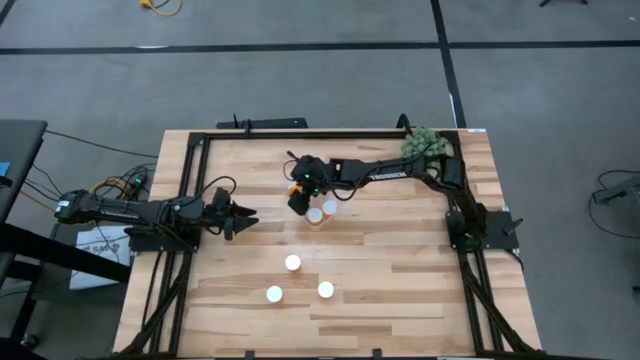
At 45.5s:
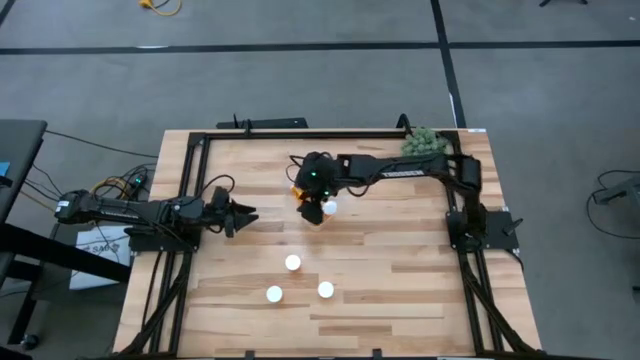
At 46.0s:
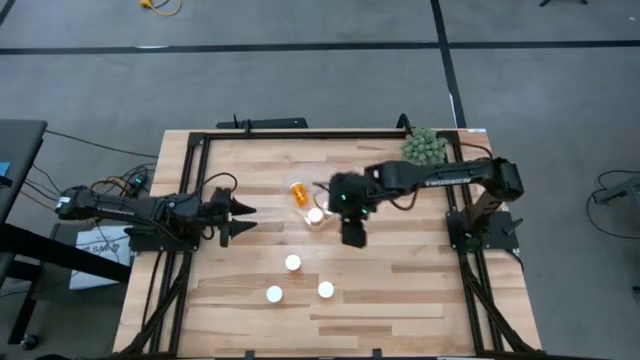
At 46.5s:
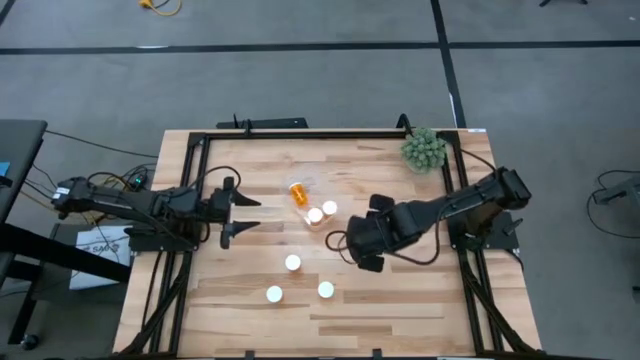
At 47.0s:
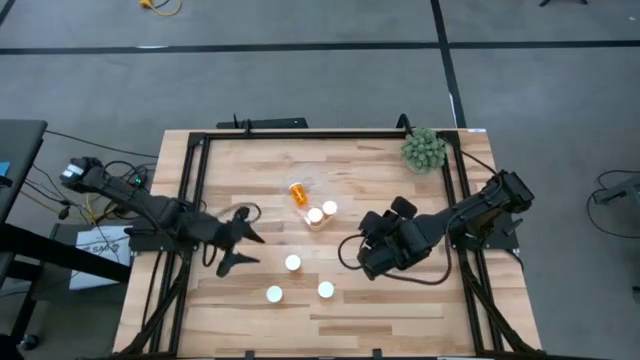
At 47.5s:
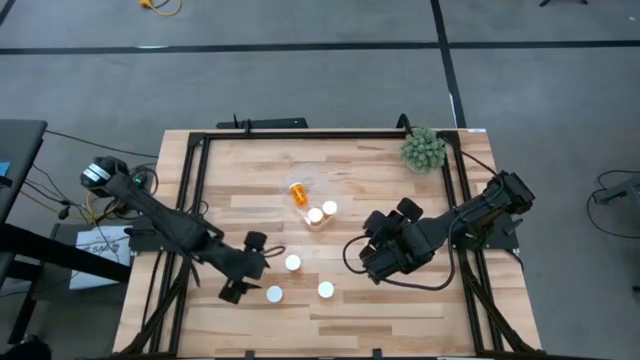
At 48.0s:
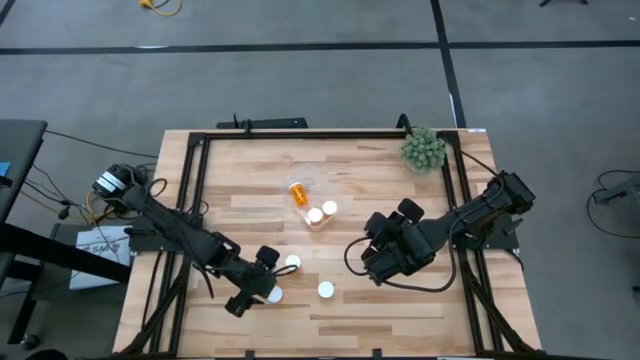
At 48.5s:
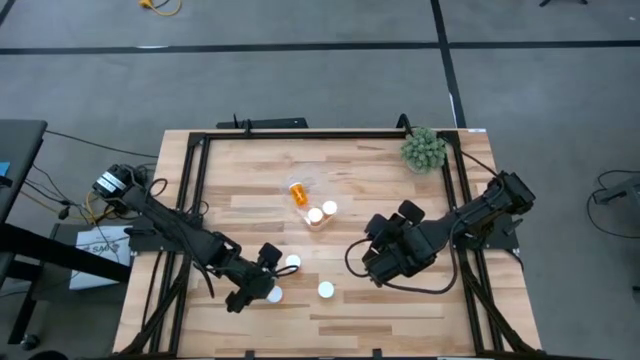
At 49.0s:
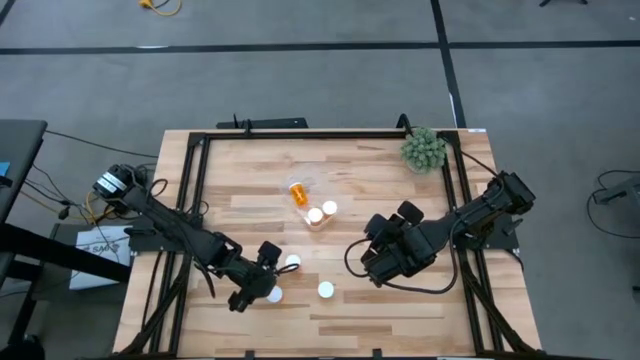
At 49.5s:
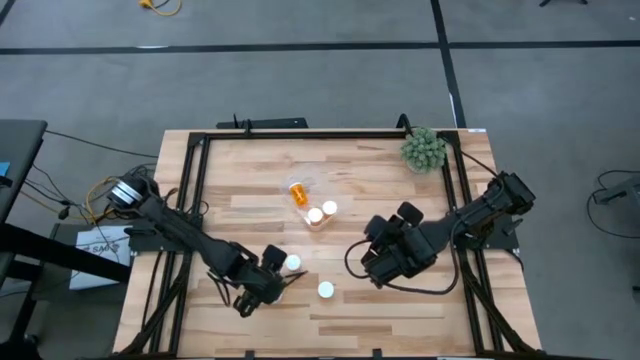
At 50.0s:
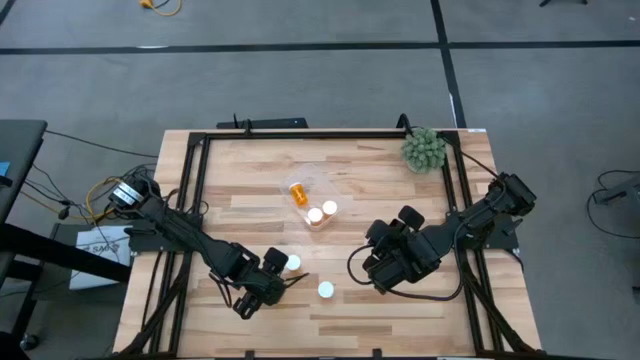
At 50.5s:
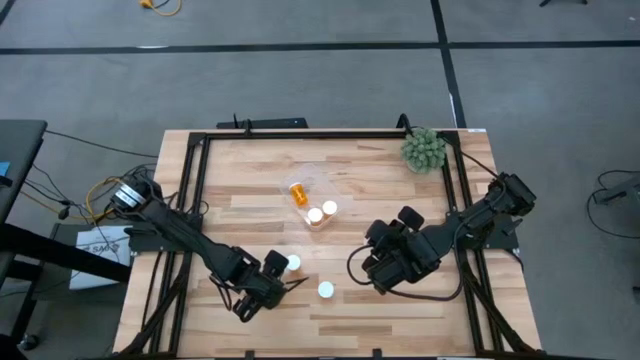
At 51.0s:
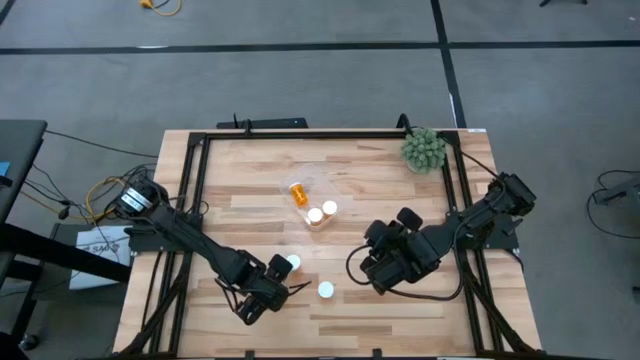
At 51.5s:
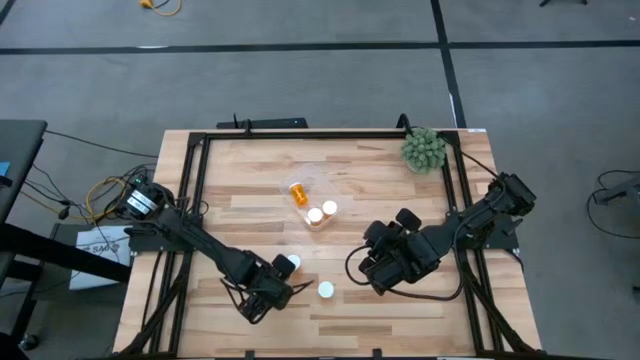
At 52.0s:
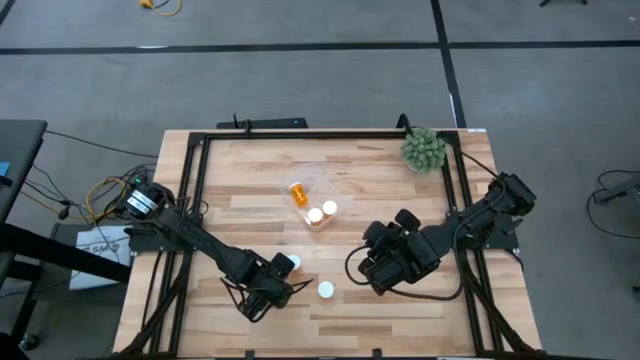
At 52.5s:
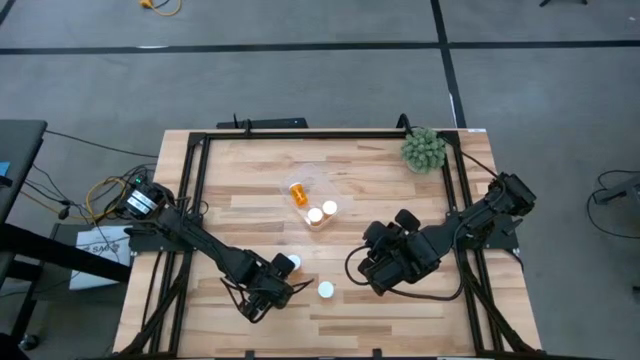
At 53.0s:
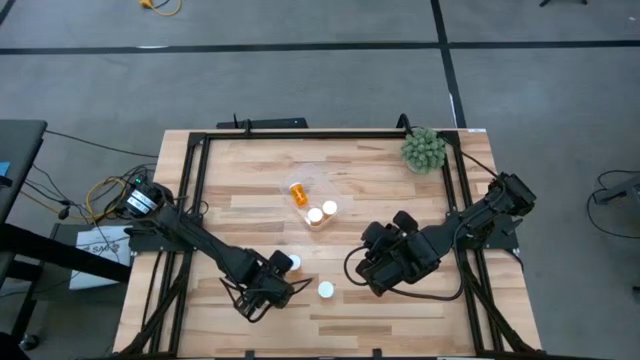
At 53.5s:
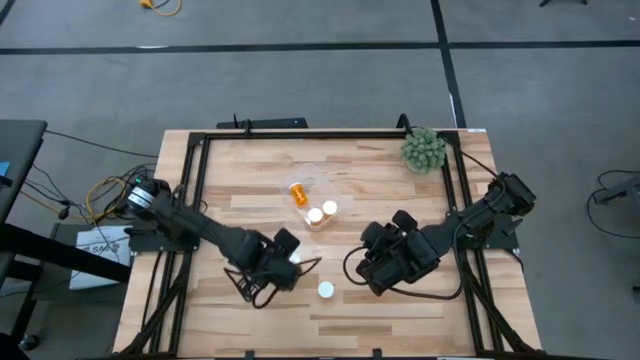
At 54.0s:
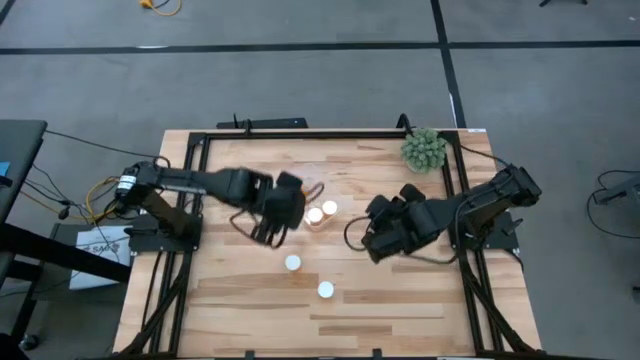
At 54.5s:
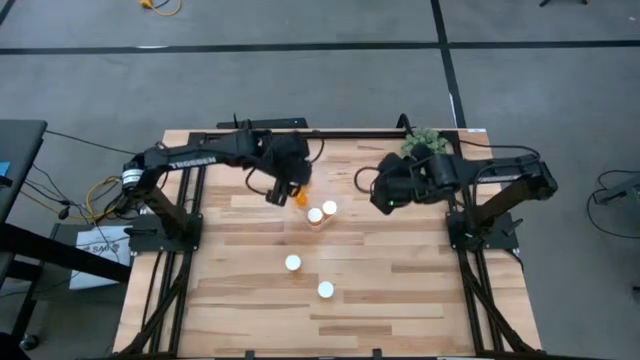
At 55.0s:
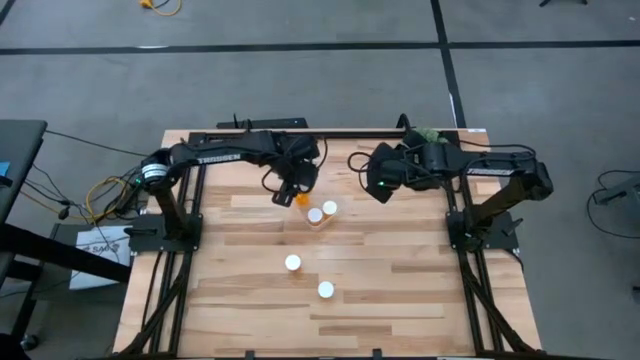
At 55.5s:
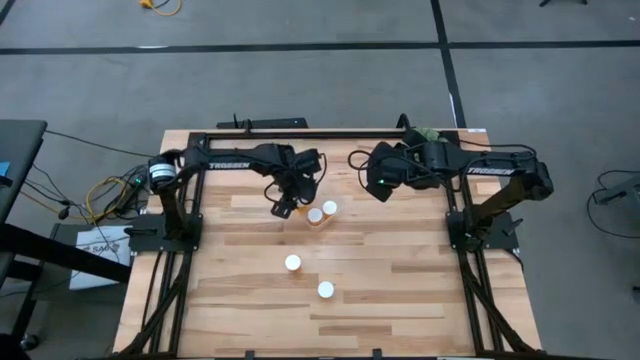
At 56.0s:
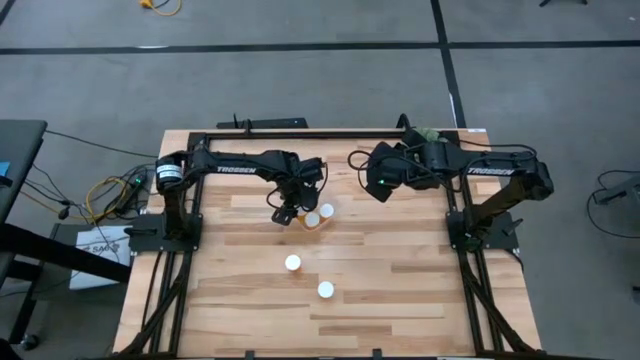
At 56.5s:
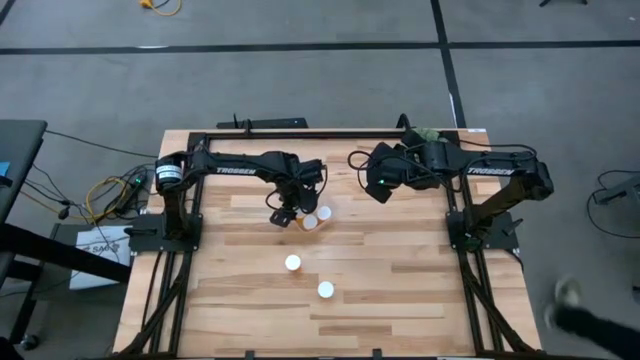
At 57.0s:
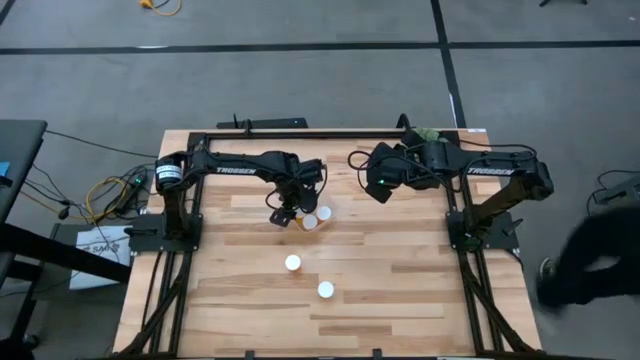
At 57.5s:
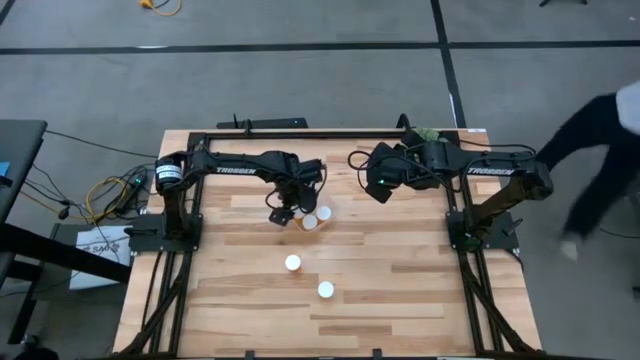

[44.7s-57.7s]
Task: Pick and place pill bottles into a basket
Put the bottom left orange medicine bottle into the transparent bin

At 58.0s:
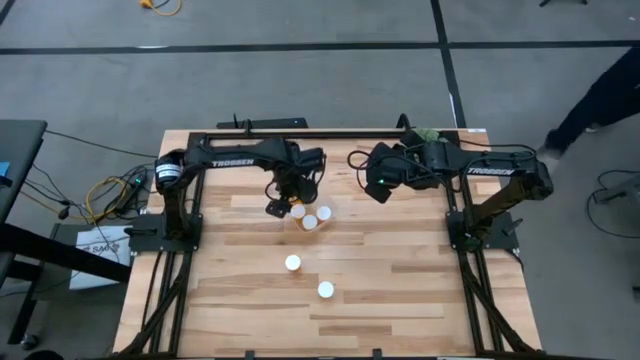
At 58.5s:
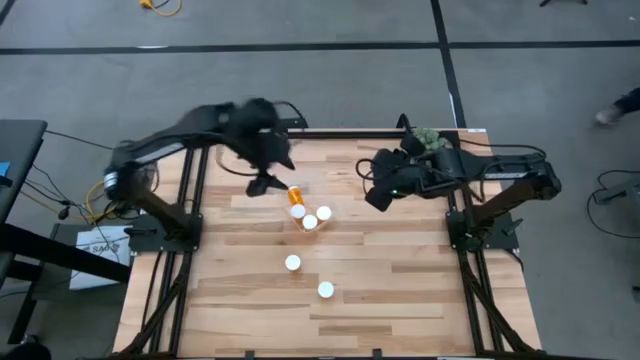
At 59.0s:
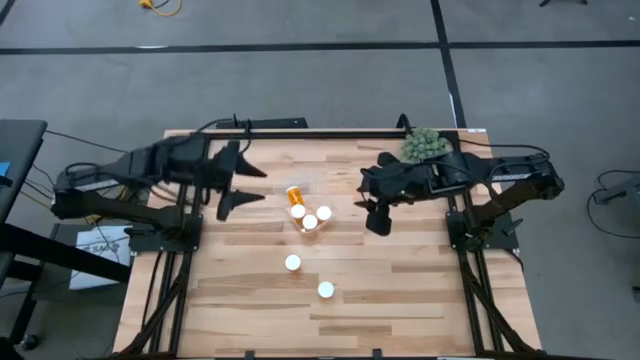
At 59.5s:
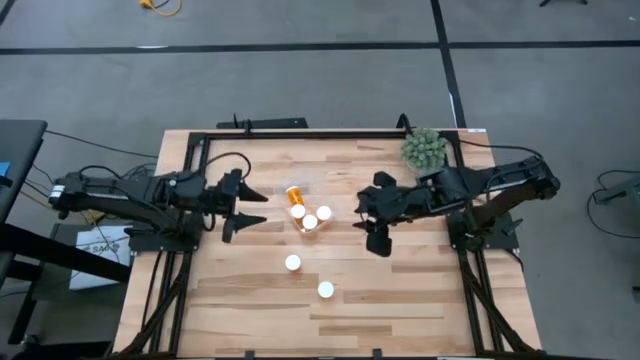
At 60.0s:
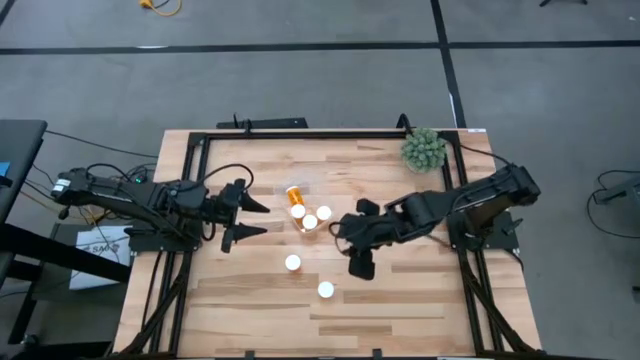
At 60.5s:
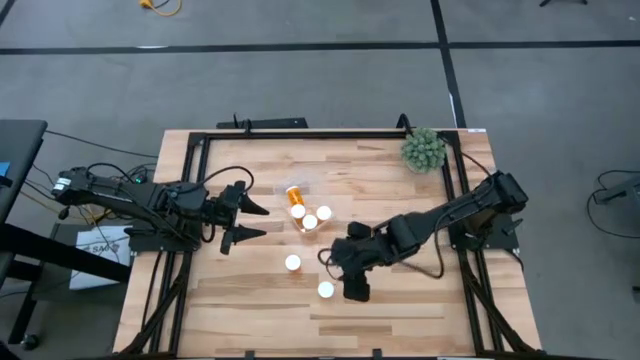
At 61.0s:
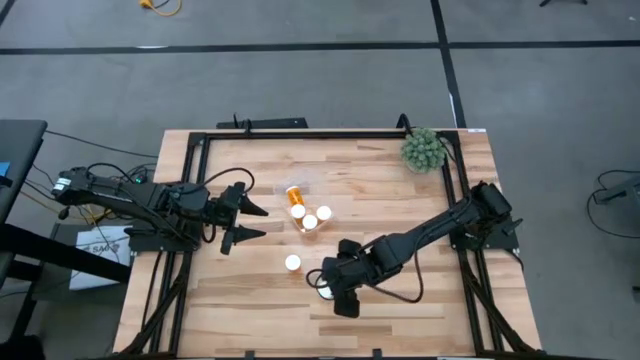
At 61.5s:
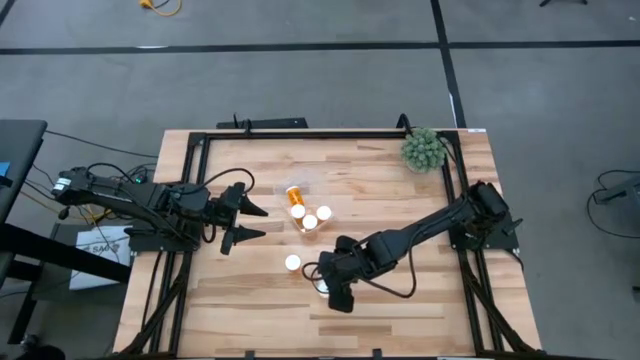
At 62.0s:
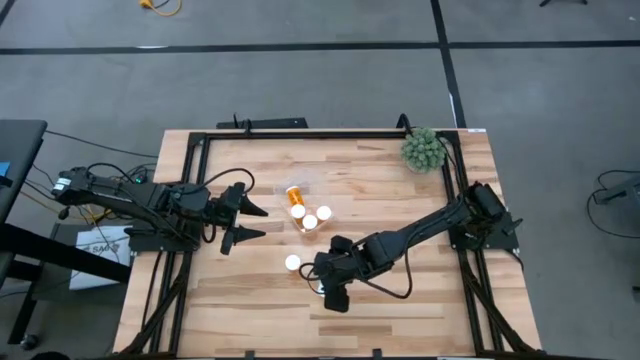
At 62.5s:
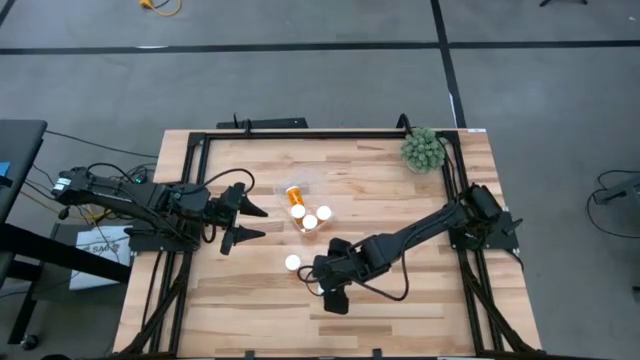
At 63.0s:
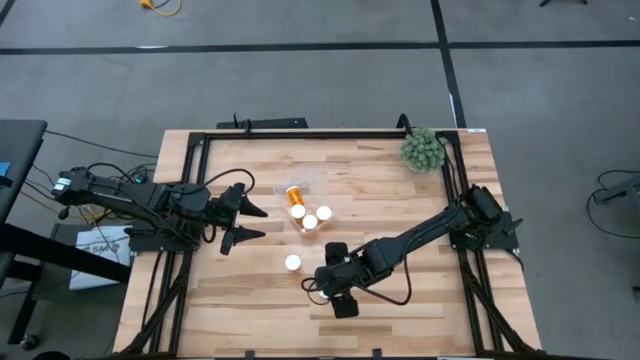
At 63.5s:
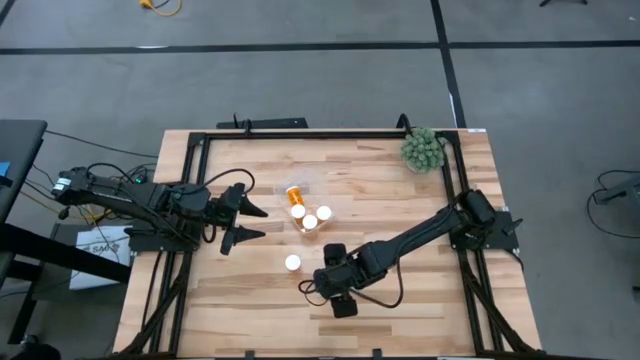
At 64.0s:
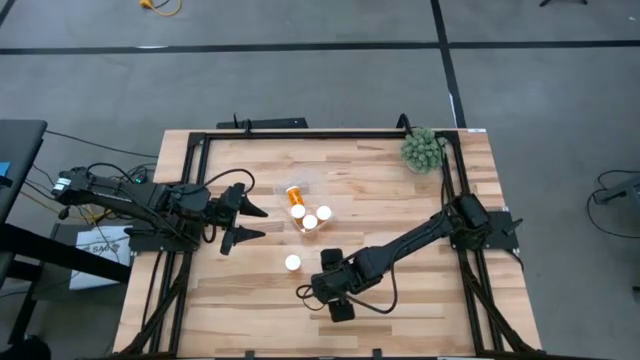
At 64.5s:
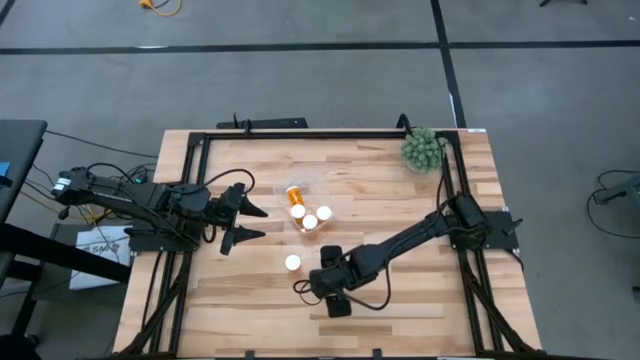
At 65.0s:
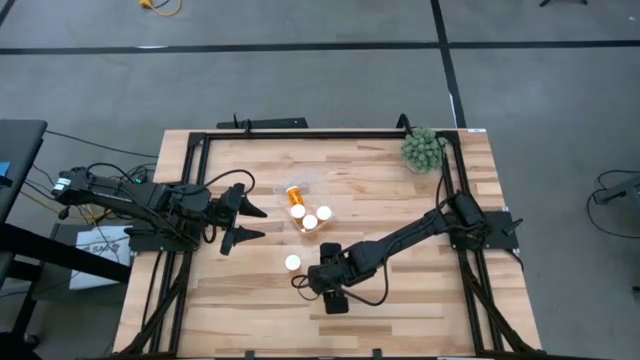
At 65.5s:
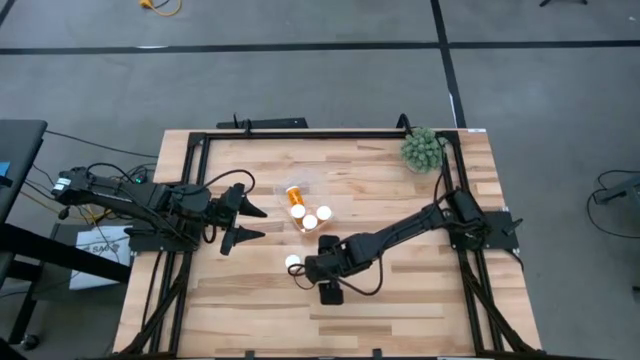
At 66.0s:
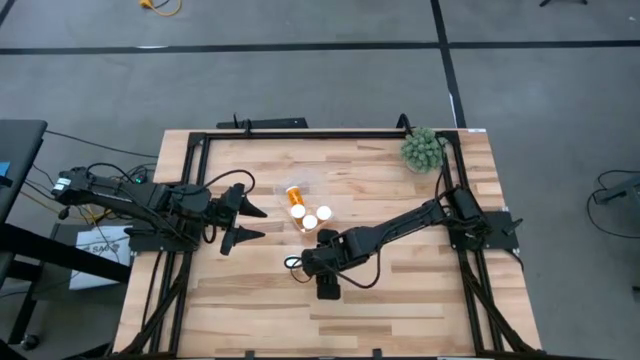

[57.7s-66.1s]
Put the bottom orange medicine bottle into the transparent bin
